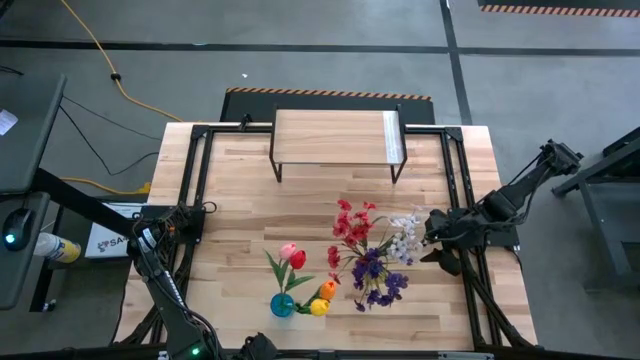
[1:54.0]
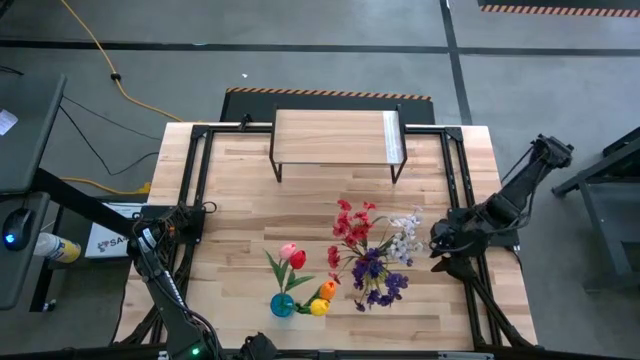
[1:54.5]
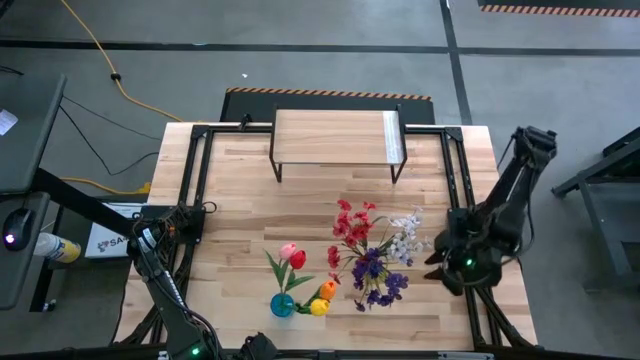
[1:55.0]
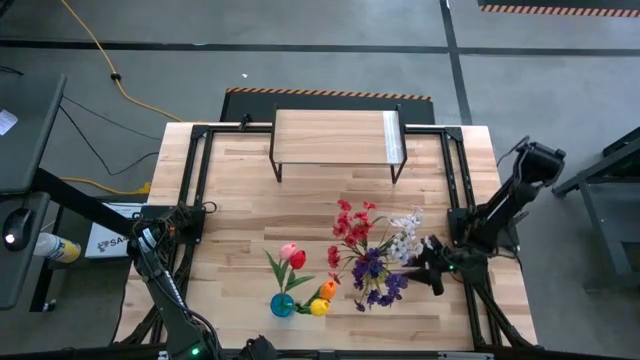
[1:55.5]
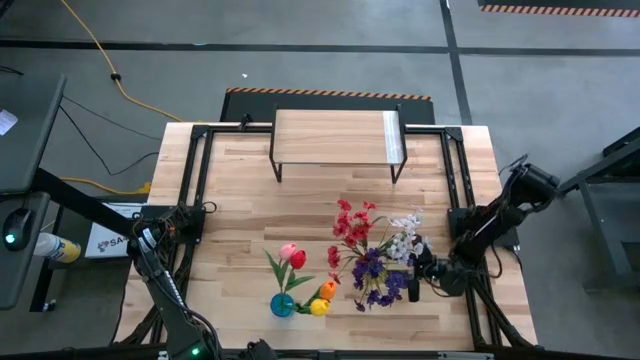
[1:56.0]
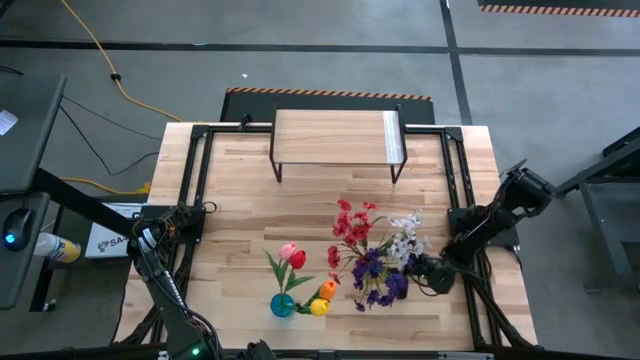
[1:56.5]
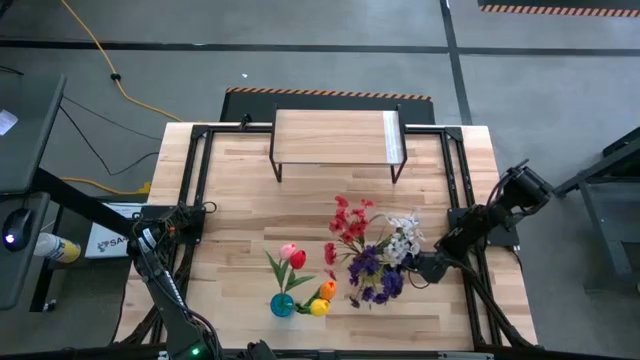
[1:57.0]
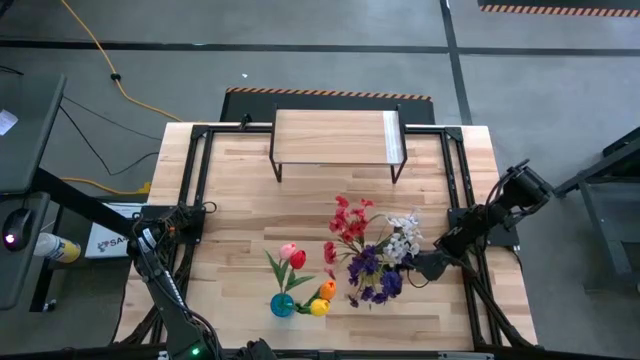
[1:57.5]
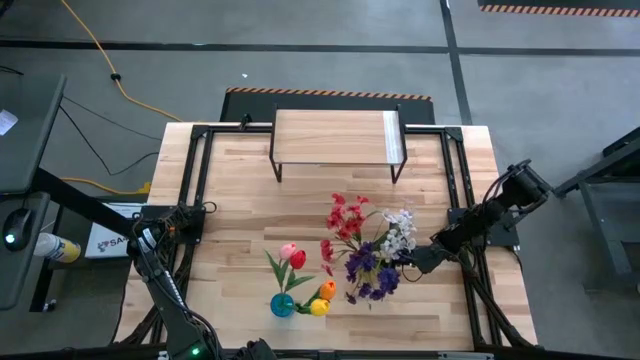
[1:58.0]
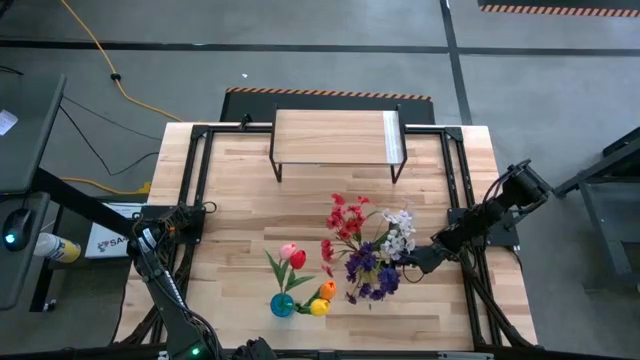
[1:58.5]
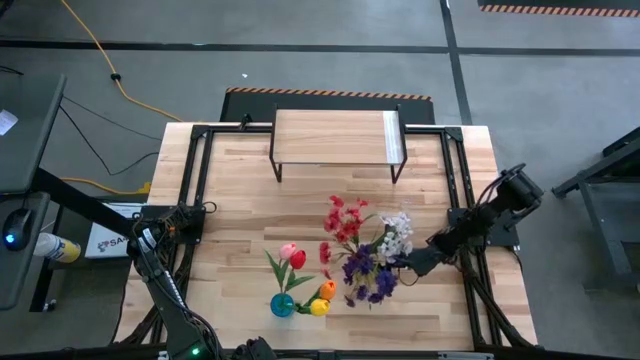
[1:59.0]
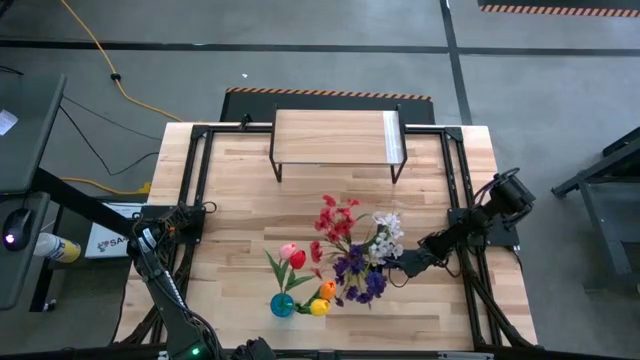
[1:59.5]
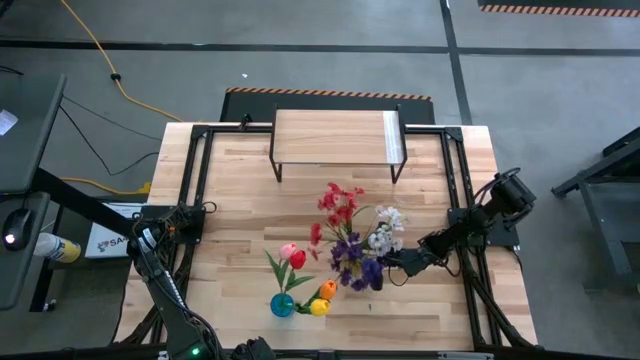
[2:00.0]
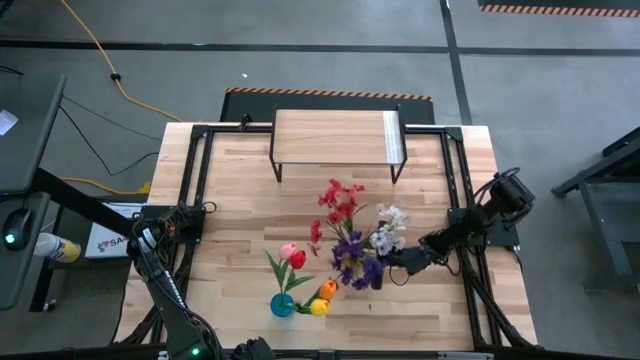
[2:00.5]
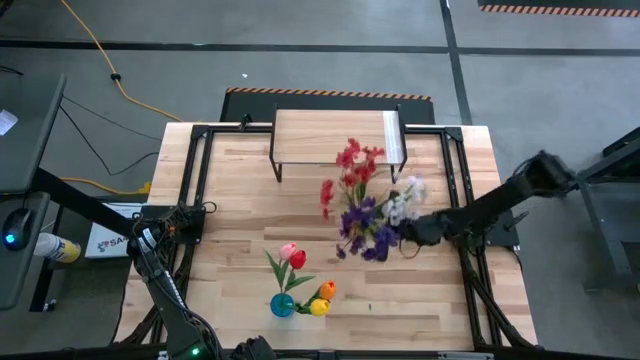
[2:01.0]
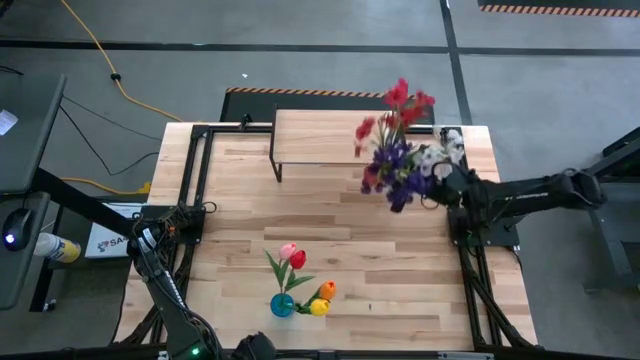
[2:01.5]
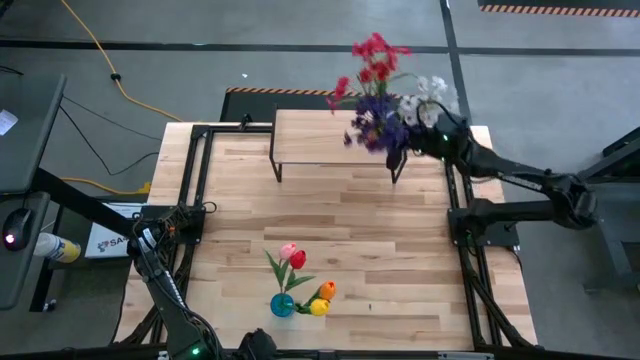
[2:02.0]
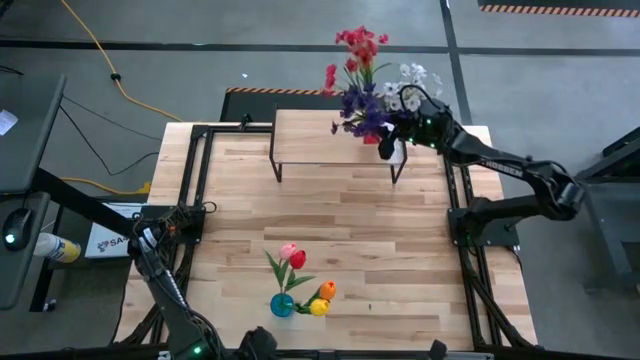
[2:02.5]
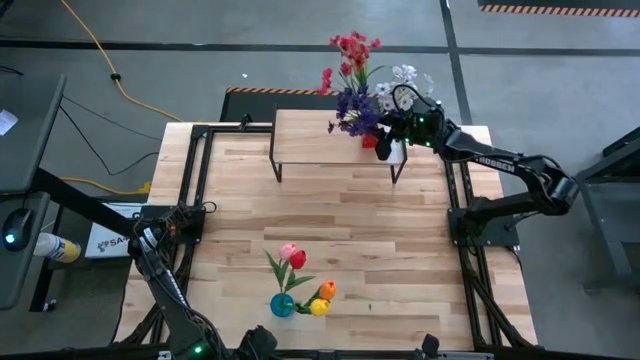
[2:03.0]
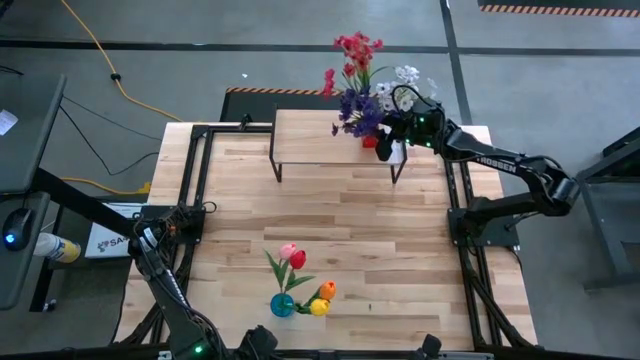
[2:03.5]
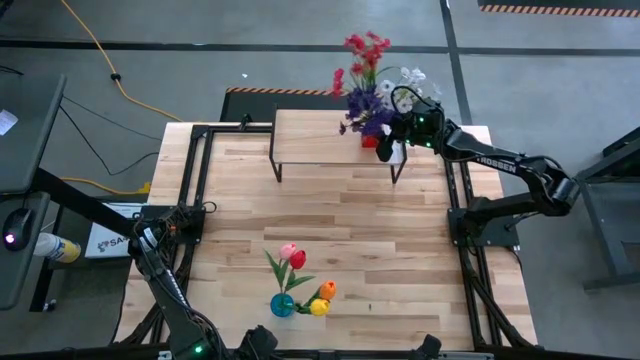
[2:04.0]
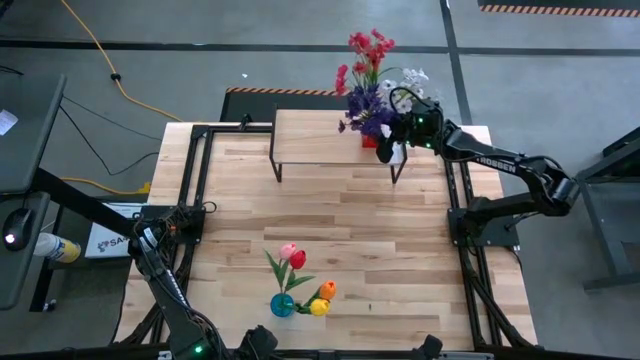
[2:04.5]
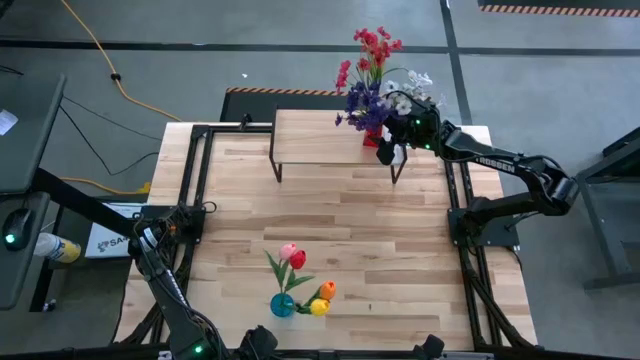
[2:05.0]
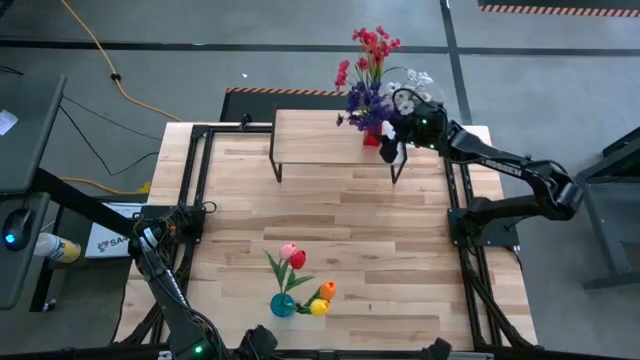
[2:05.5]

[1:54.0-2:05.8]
Task: Pick and place flowers into a vace then onto a shelf
Put the red transparent flower vase on the shelf

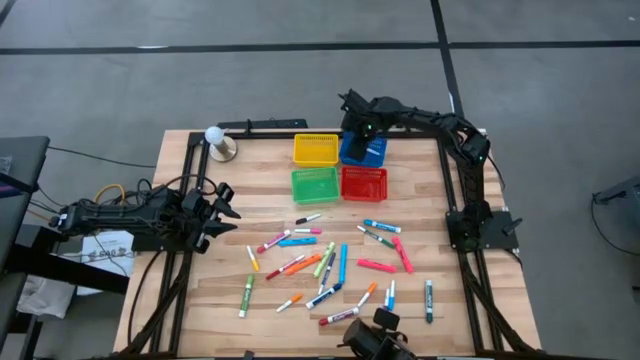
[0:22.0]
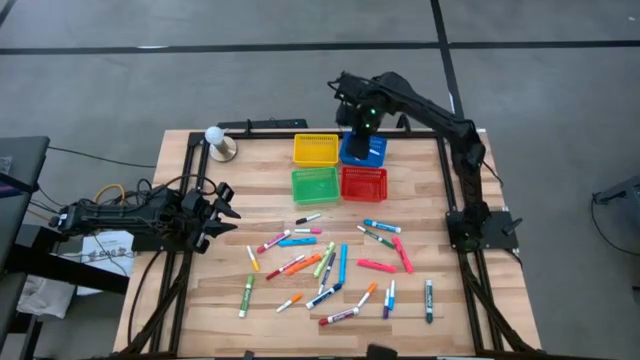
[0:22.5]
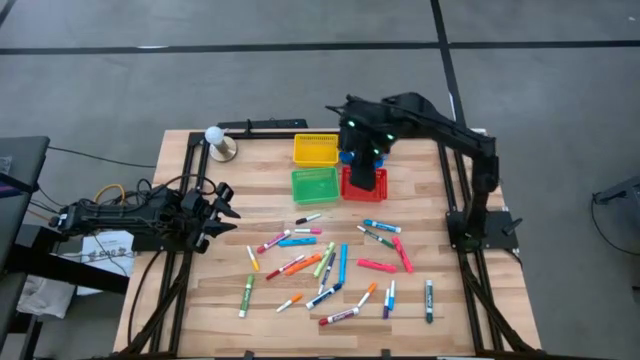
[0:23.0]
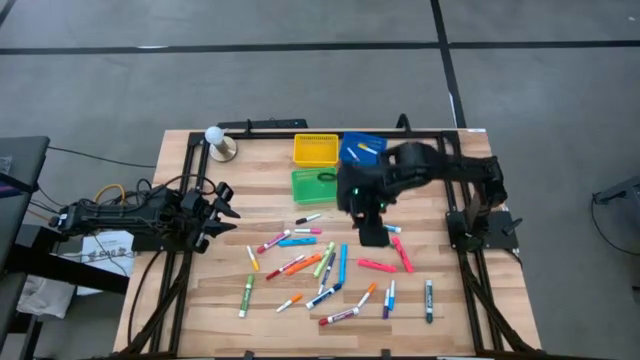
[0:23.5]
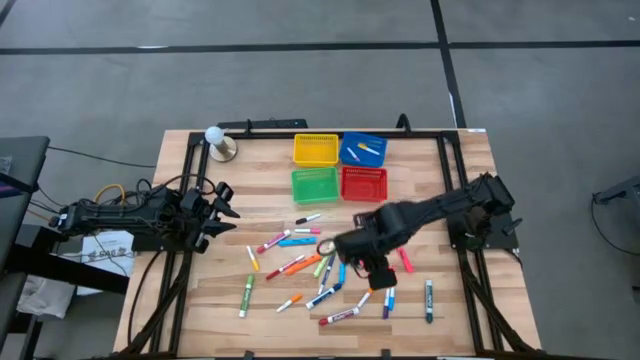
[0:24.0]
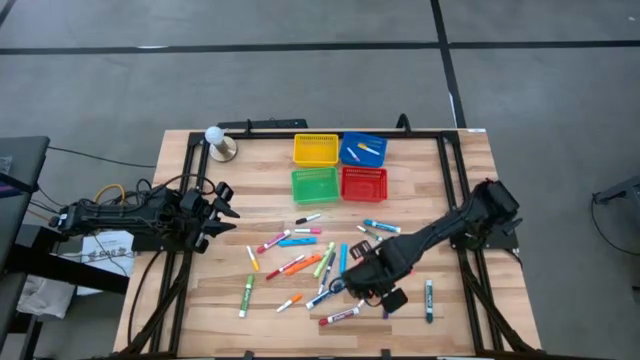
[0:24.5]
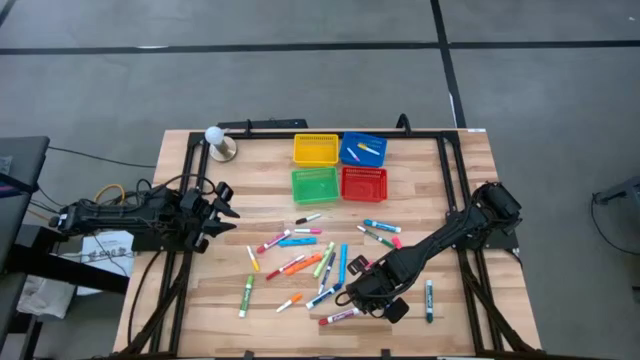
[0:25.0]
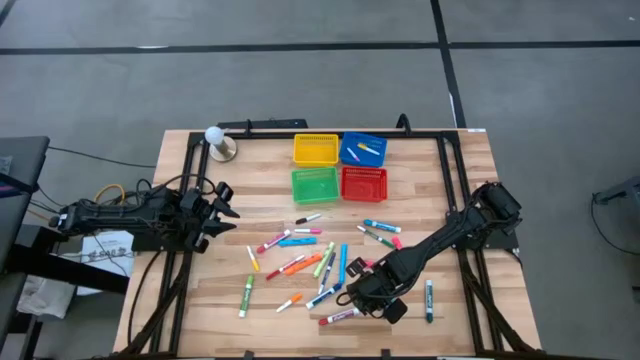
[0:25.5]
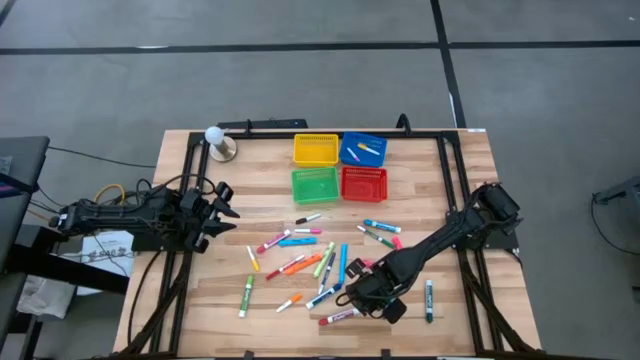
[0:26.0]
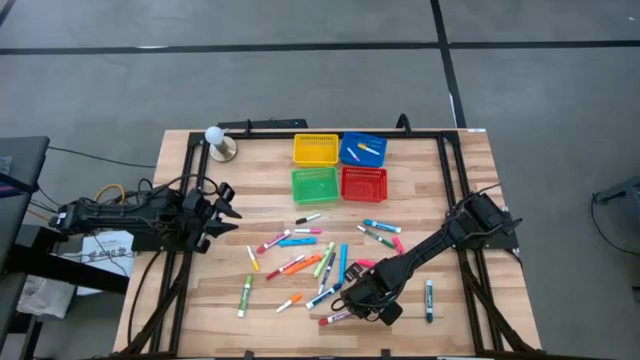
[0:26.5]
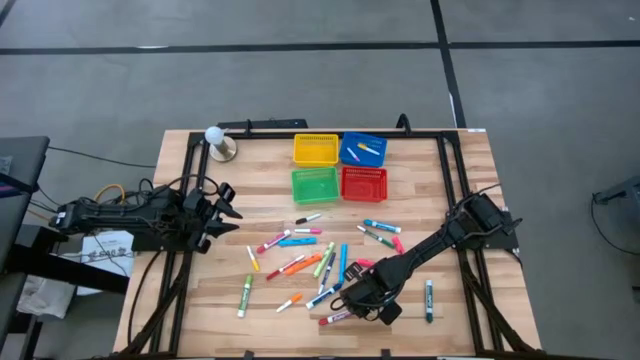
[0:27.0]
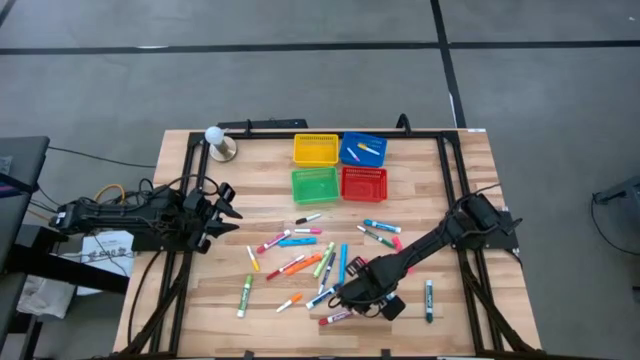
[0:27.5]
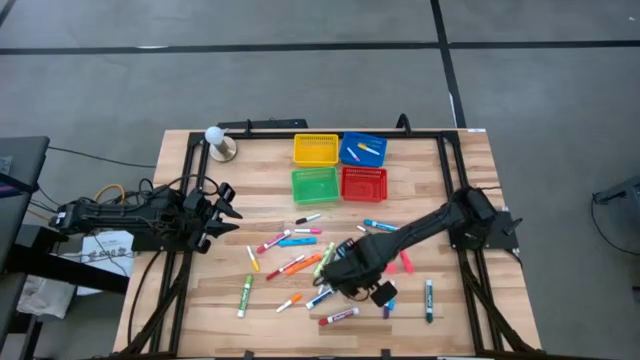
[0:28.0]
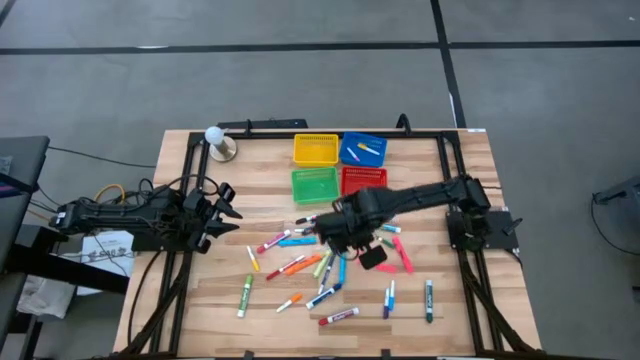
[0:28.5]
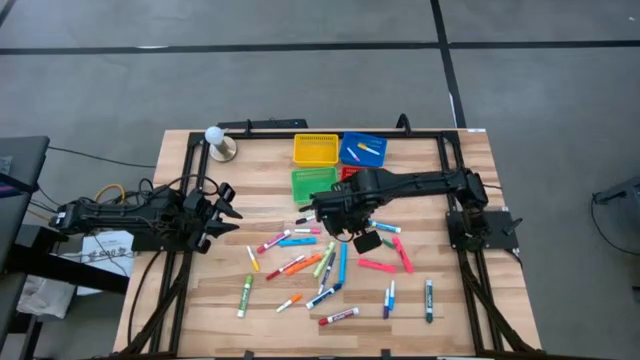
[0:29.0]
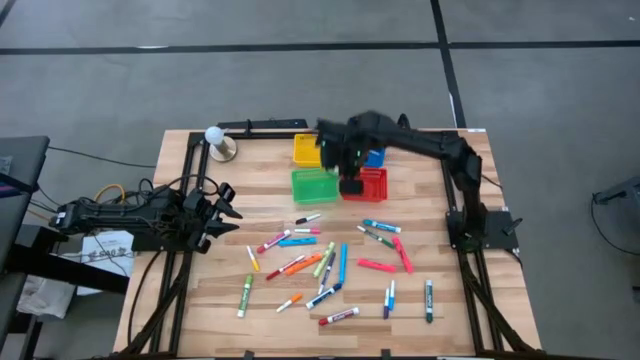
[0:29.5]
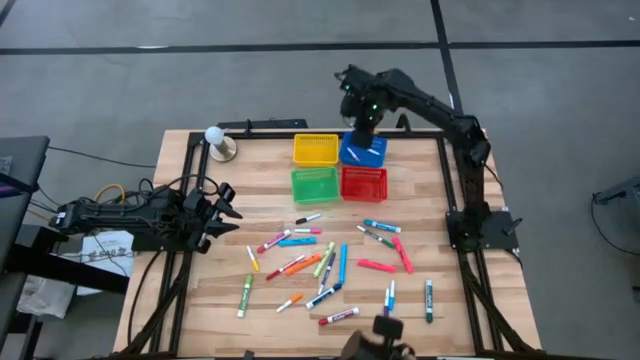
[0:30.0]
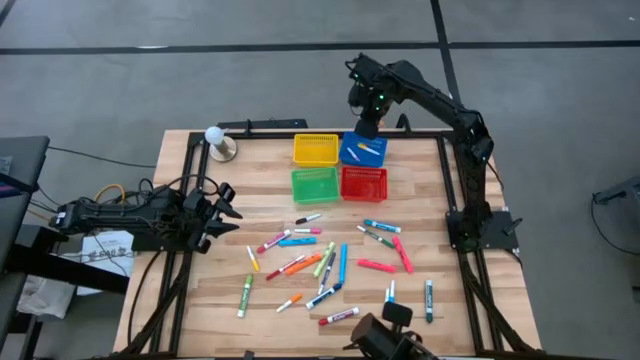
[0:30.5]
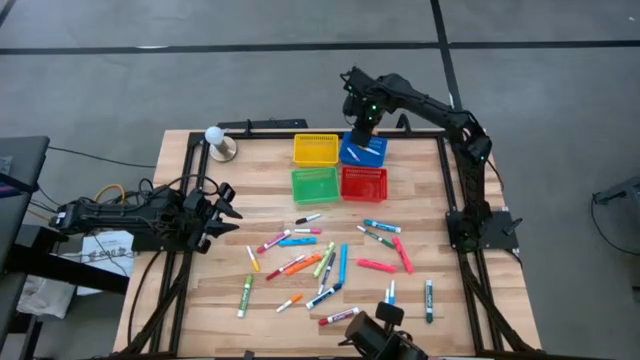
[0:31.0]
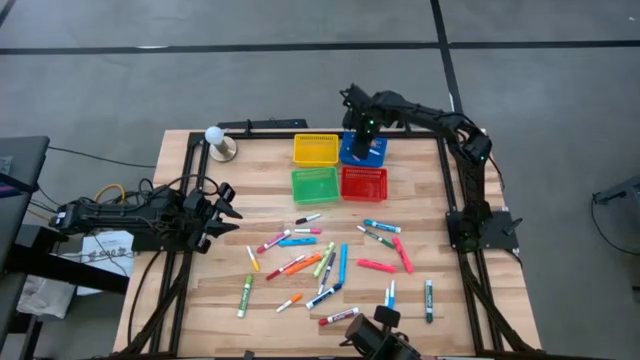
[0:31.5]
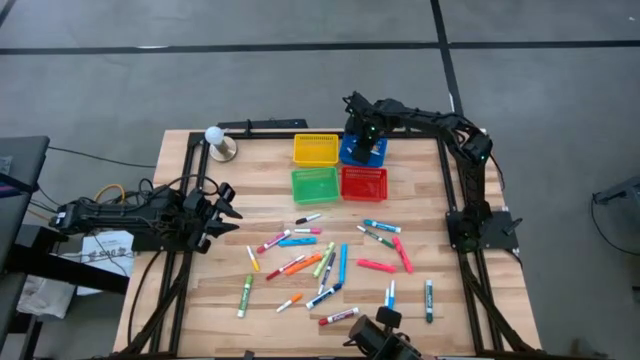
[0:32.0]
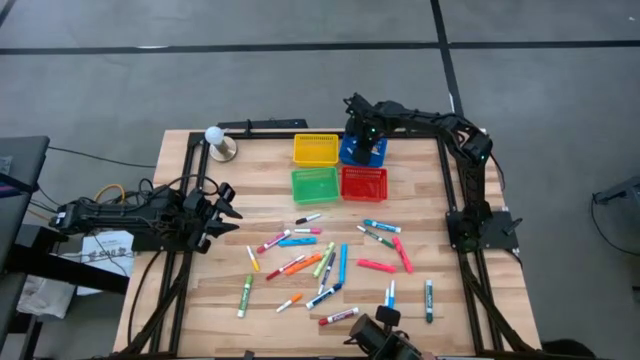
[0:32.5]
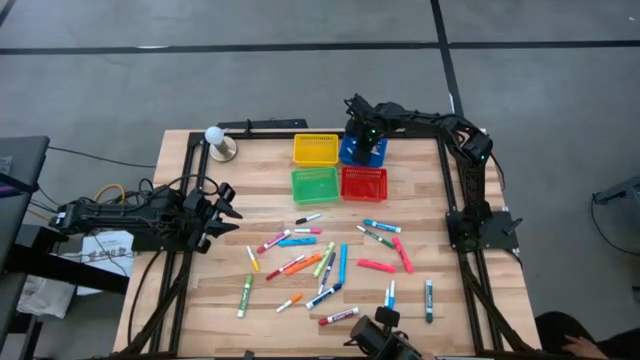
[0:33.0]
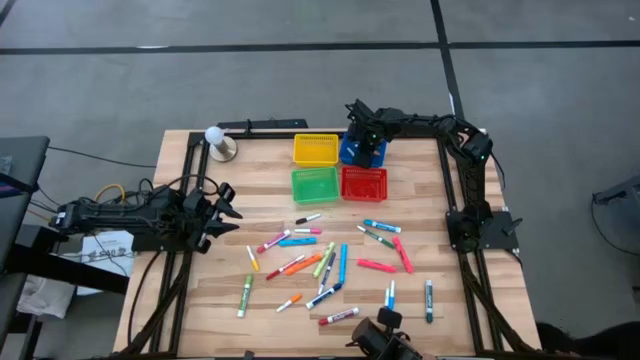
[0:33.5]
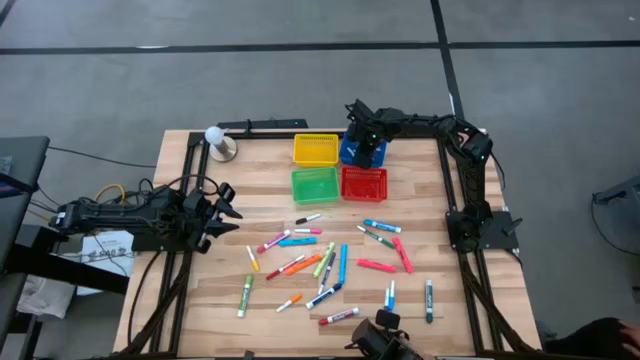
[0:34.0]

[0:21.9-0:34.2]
Task: Pick & Place Markers
Put the orange mini marker into the blue bin
